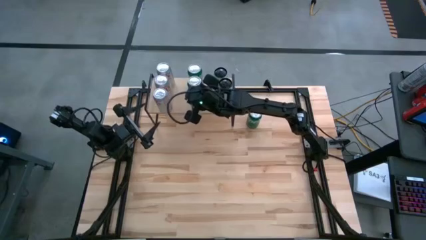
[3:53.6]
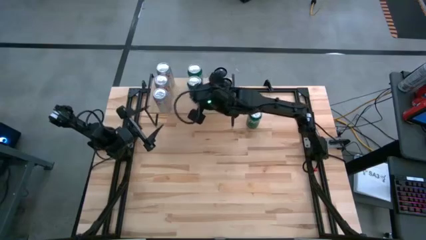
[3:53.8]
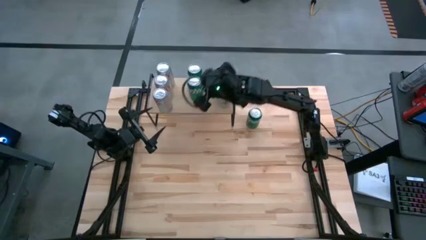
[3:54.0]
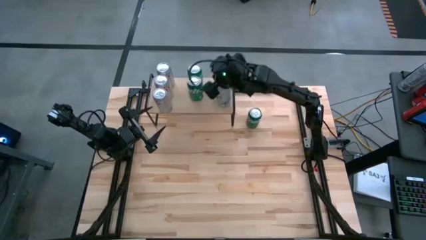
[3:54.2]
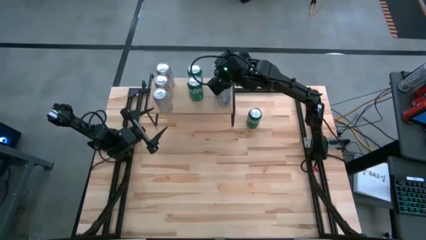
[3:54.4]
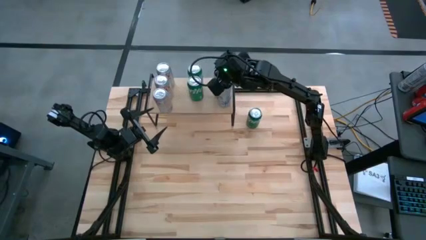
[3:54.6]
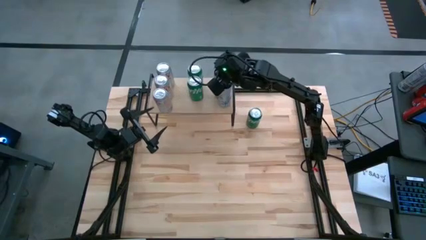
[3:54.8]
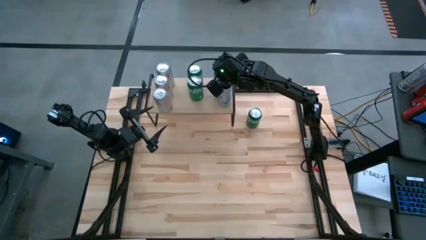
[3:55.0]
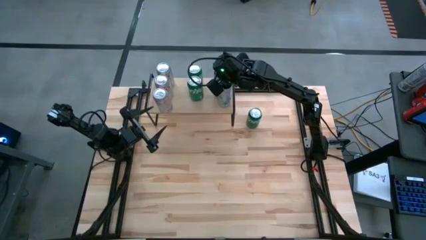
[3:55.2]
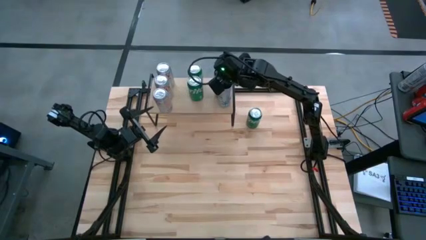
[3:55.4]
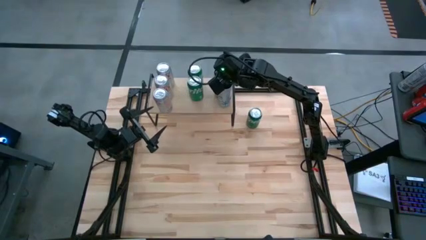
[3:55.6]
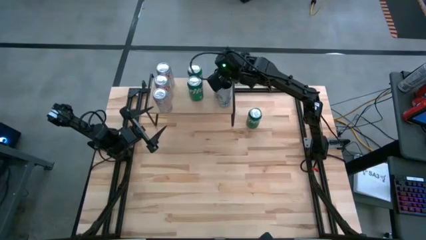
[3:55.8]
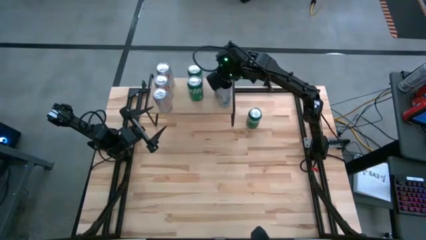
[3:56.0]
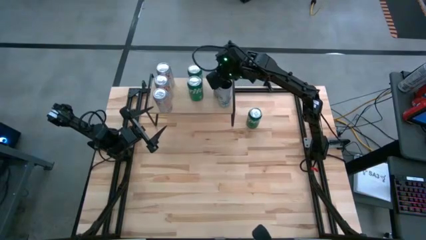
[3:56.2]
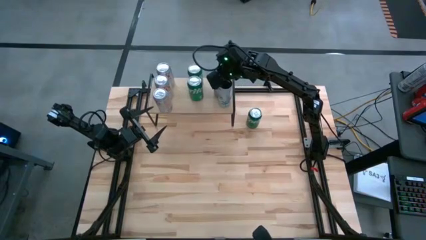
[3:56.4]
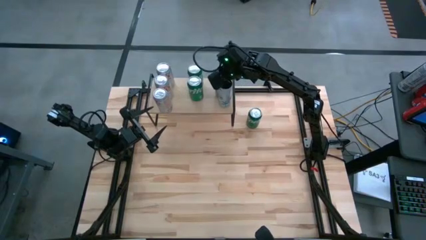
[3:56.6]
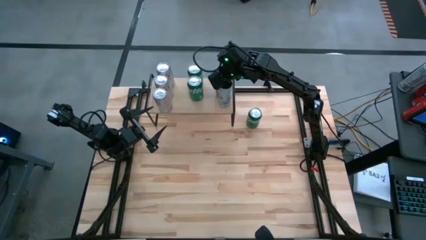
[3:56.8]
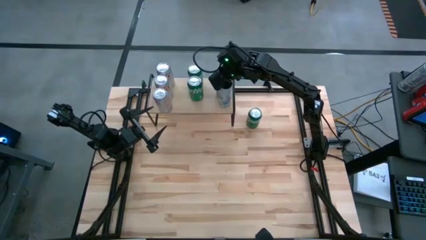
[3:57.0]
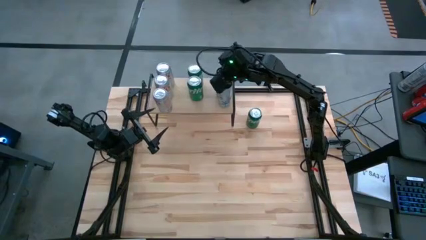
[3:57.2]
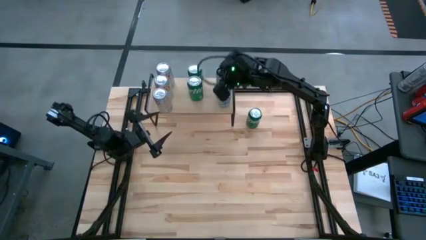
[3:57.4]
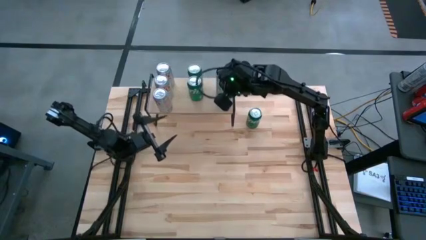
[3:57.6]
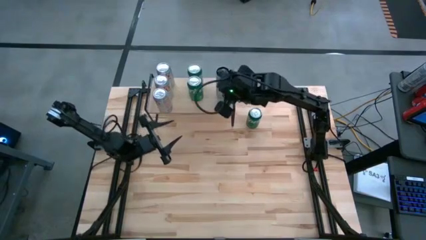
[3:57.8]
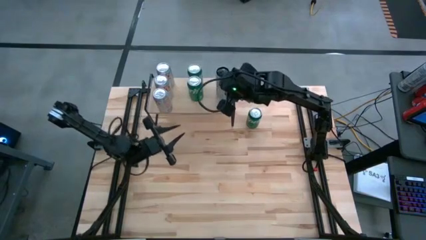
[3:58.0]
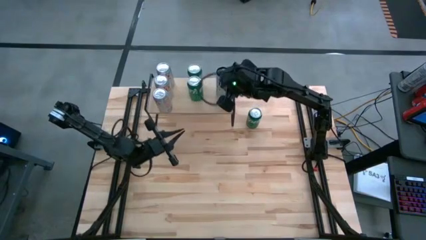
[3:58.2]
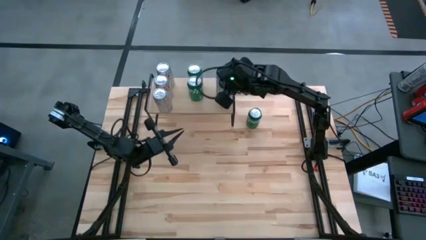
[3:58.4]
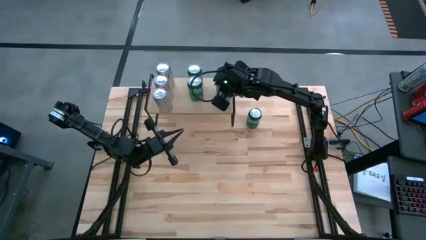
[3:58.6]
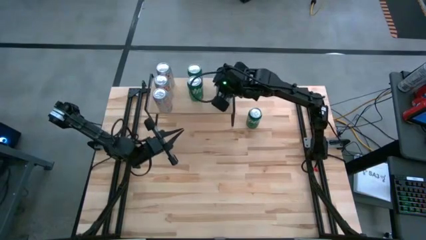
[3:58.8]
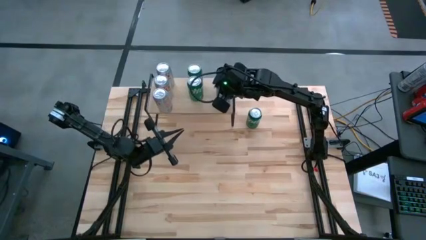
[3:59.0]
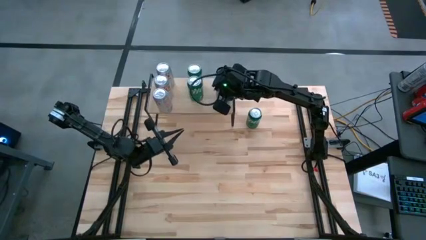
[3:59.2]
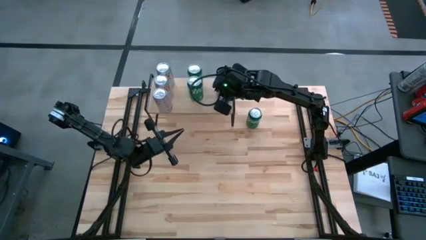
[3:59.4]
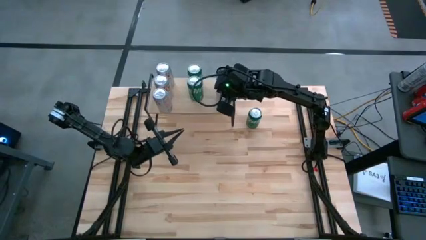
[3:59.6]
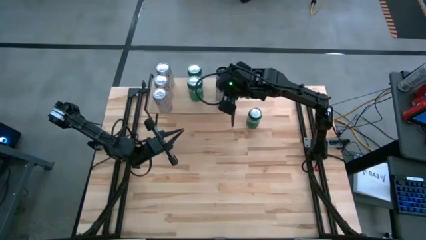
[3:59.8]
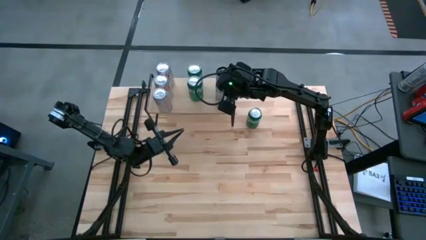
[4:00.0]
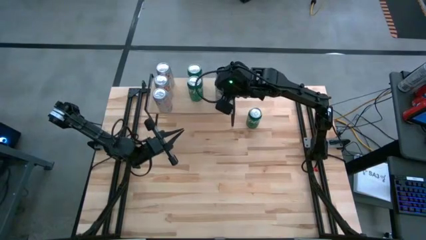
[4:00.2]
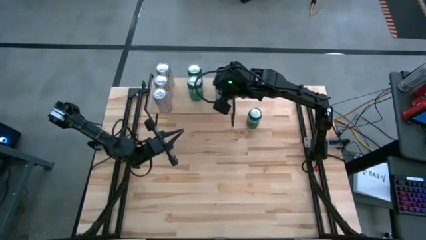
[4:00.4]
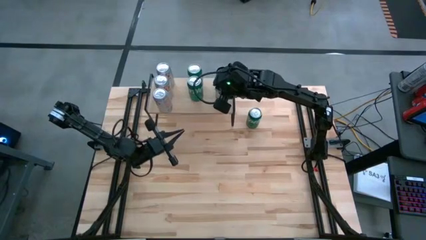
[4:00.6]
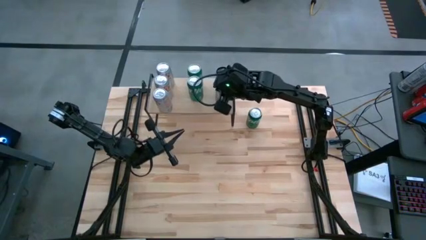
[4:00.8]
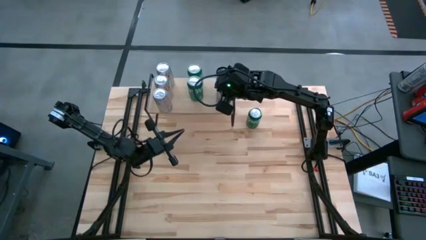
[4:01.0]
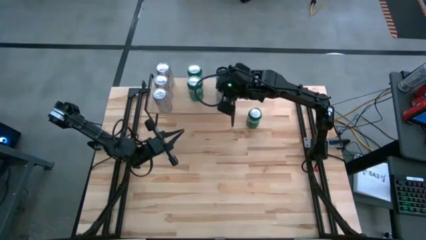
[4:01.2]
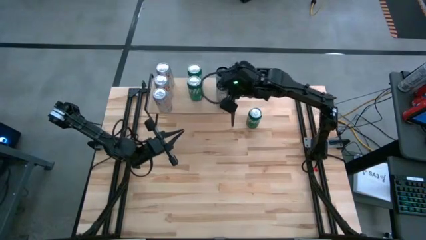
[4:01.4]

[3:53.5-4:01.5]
Task: Place canned beverage on shelf
Adjust the white-blue soda cans on the shelf

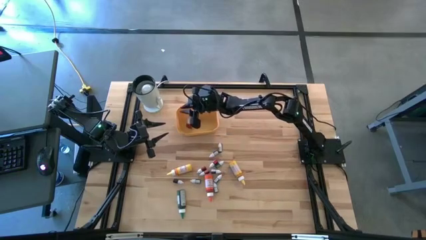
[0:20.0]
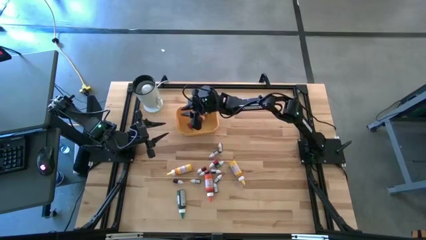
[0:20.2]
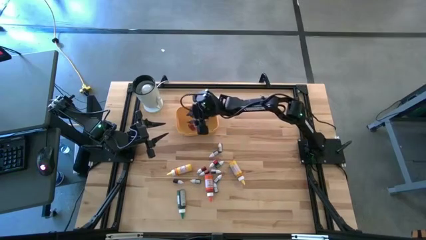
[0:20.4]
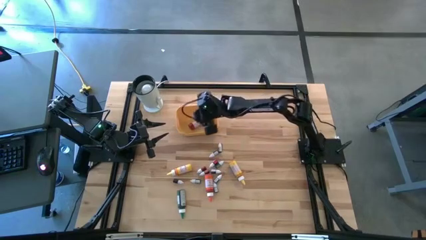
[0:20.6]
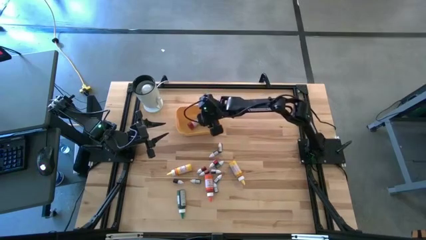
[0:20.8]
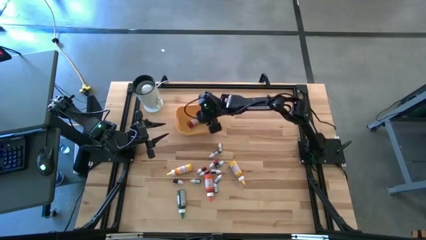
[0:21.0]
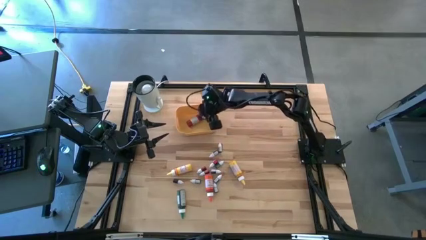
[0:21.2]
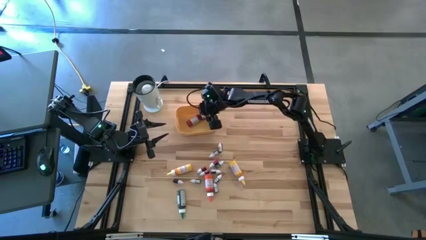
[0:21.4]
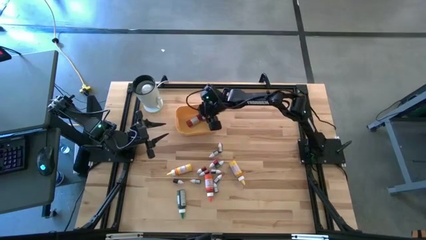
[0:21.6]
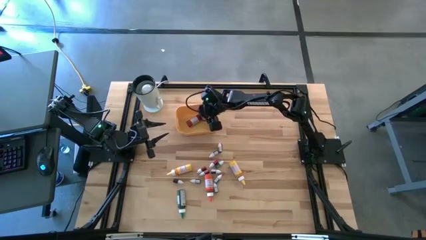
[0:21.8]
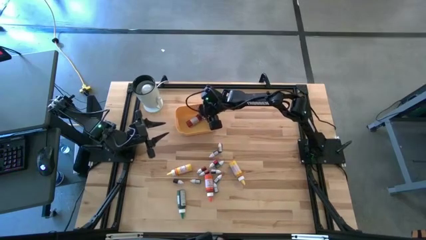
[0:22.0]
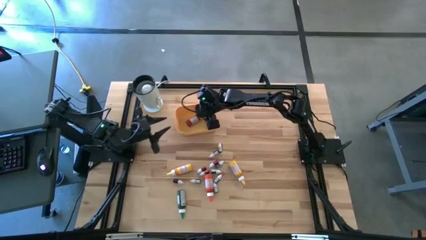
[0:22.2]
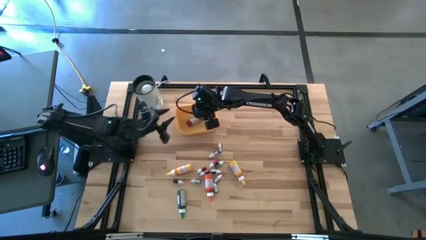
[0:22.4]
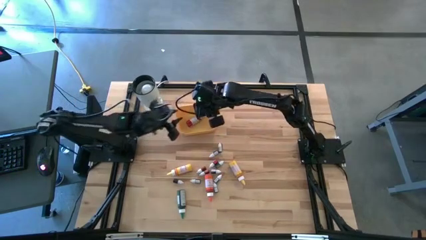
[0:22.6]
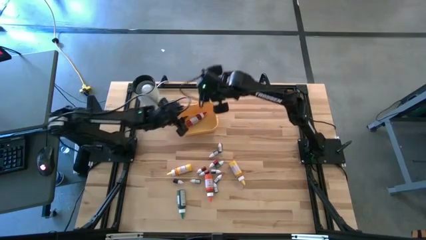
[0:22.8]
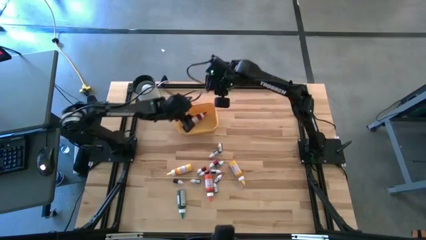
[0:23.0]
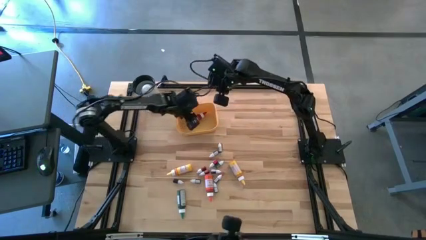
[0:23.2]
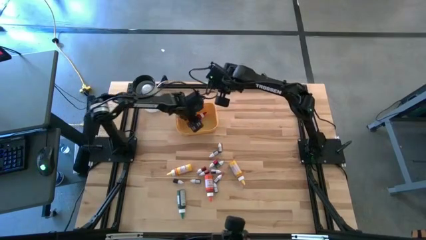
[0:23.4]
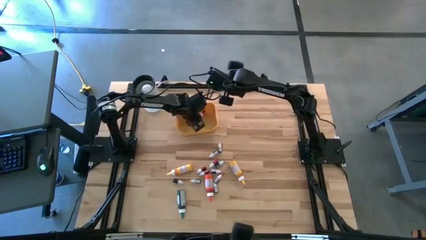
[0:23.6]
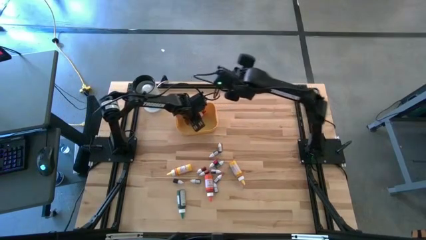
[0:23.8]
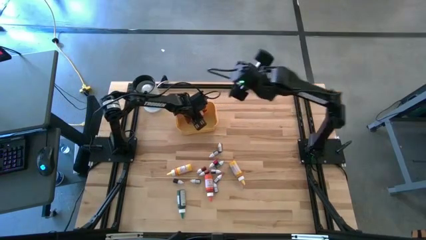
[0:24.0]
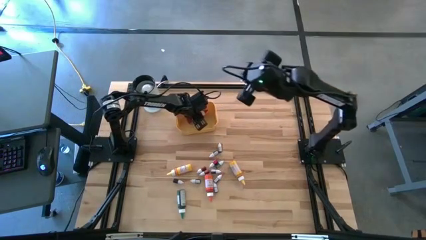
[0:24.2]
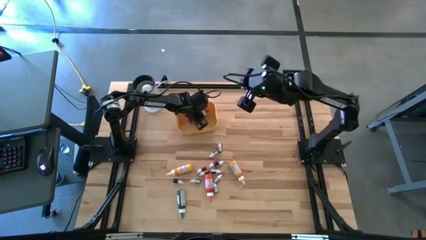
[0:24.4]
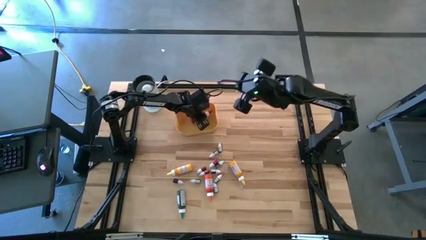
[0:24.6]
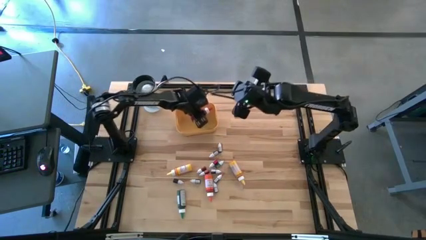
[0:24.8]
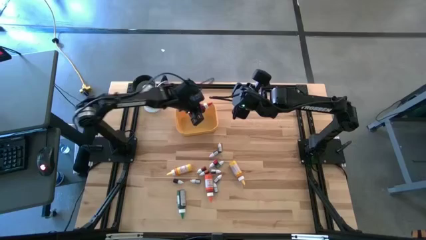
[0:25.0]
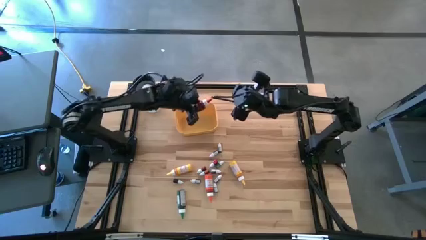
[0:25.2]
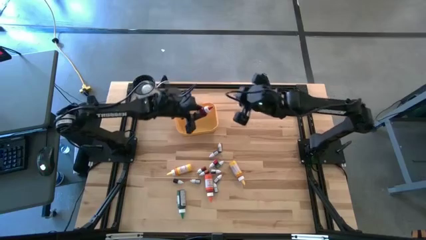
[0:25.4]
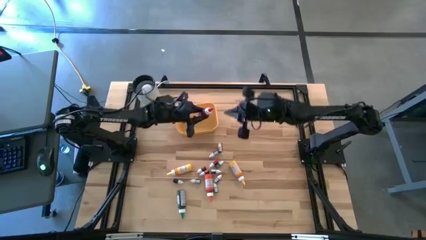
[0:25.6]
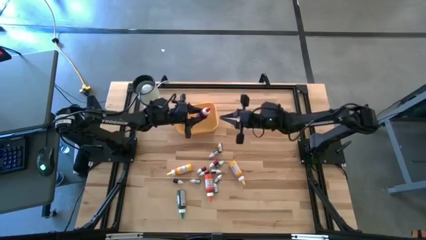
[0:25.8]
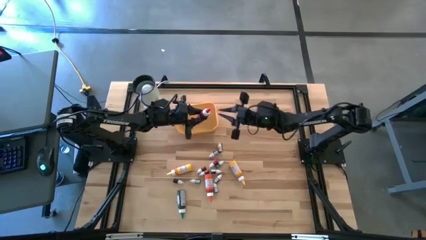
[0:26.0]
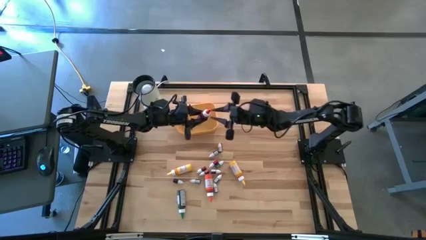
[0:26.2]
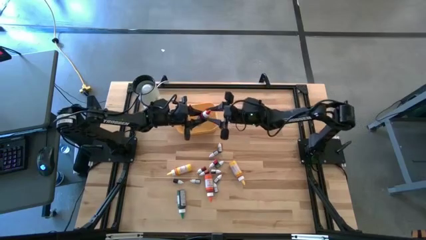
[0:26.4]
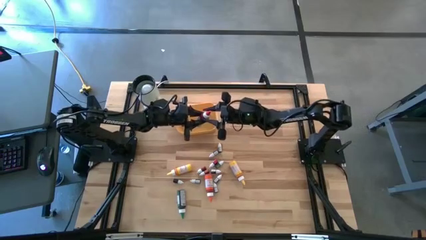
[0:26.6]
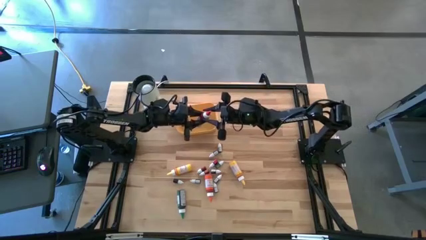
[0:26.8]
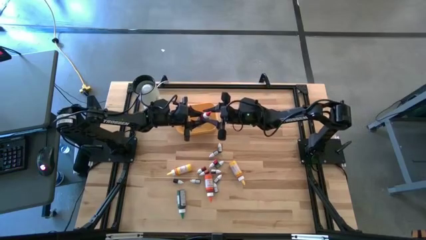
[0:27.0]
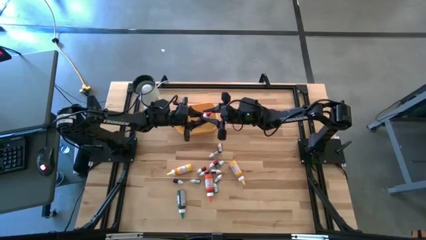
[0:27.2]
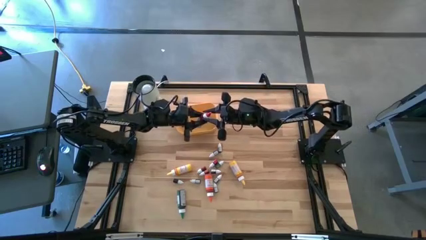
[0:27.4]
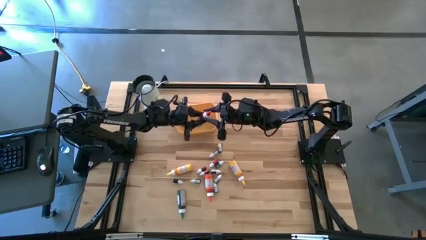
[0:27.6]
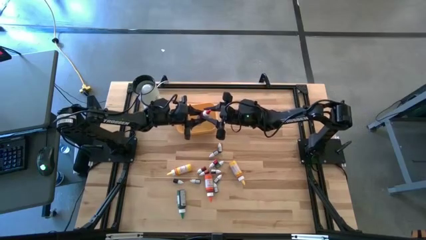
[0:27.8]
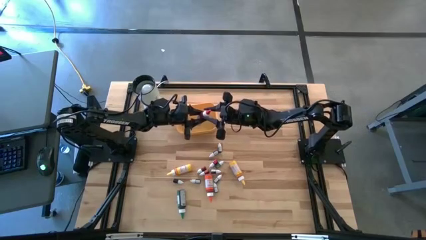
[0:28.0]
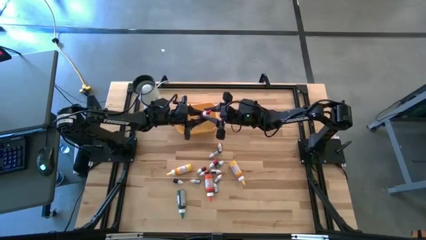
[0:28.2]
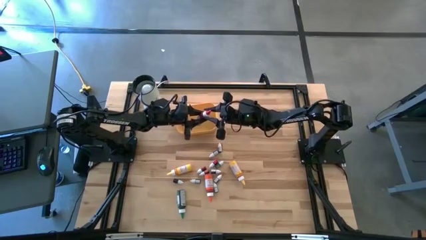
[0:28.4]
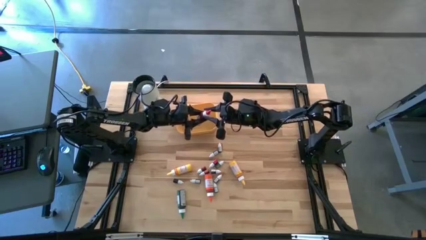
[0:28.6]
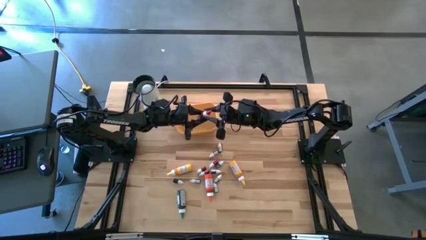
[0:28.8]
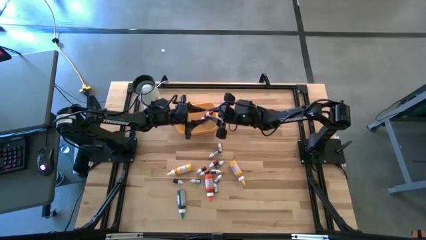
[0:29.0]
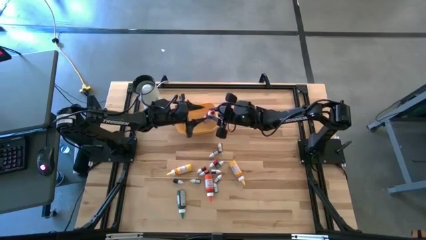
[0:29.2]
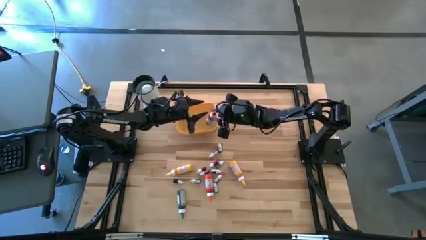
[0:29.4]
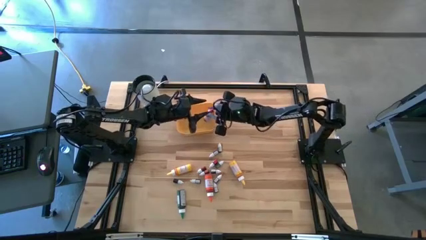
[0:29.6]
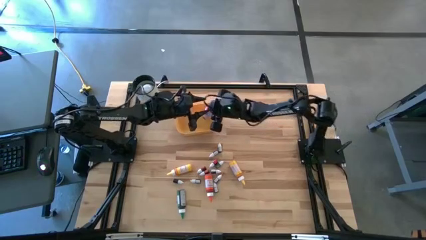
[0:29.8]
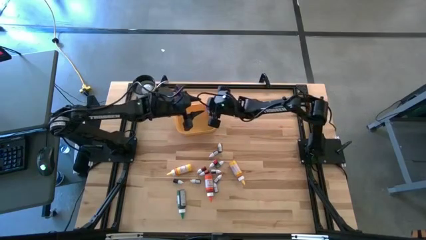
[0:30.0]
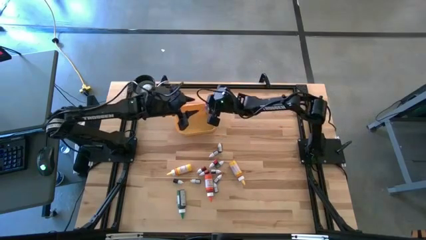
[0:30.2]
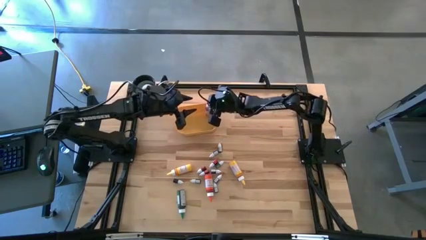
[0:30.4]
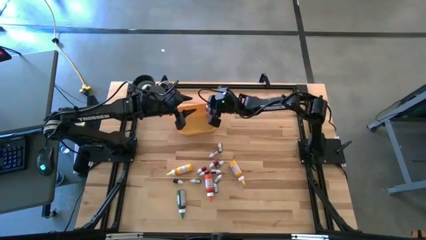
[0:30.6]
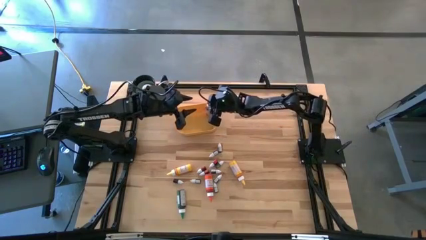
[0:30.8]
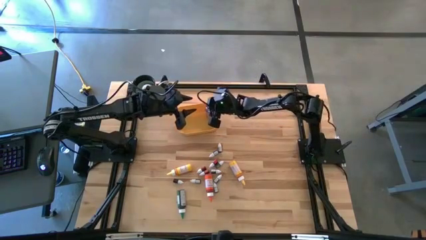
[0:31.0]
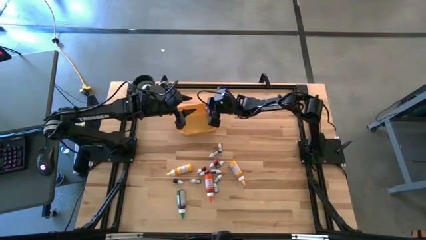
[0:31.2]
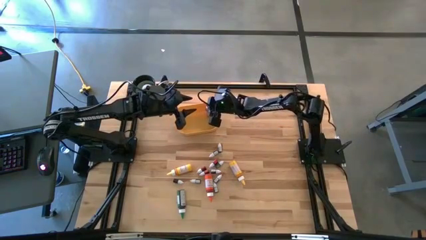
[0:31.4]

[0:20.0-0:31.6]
Task: Pick & Place food coloring
Put the large red food coloring bottle into the yellow bin
